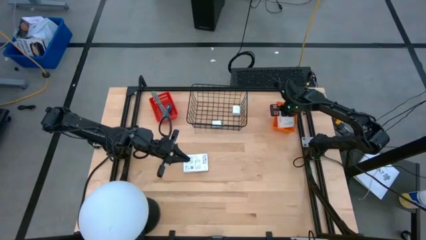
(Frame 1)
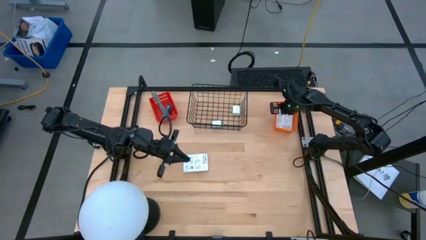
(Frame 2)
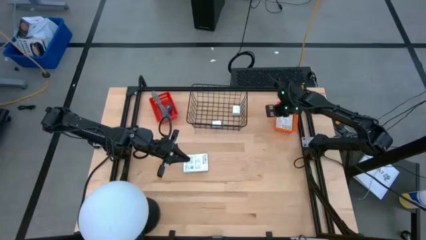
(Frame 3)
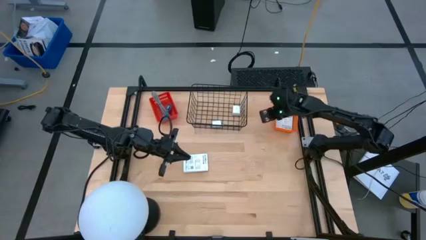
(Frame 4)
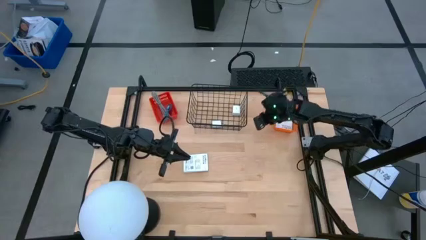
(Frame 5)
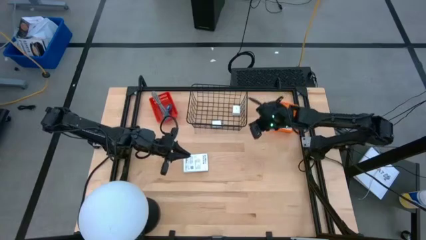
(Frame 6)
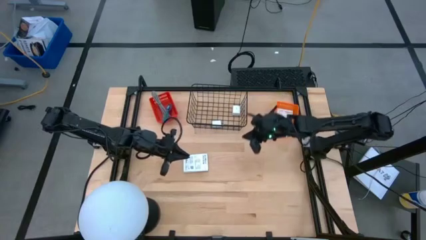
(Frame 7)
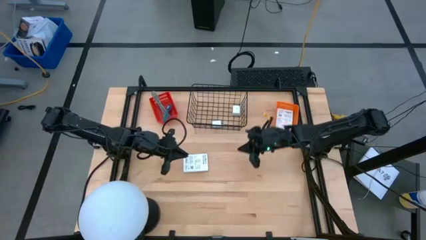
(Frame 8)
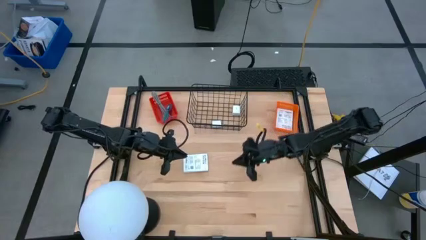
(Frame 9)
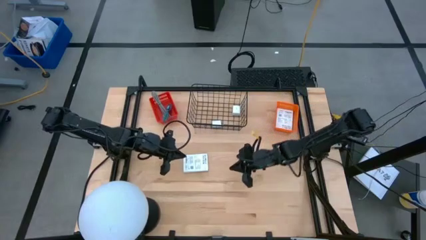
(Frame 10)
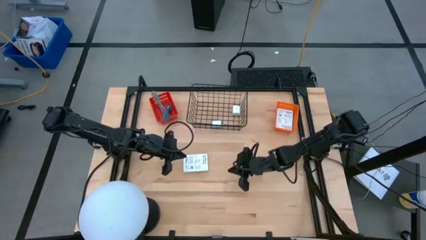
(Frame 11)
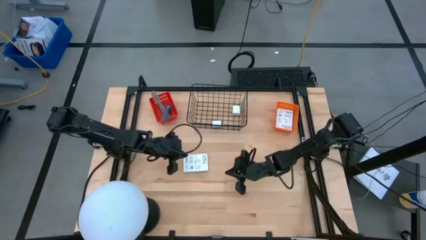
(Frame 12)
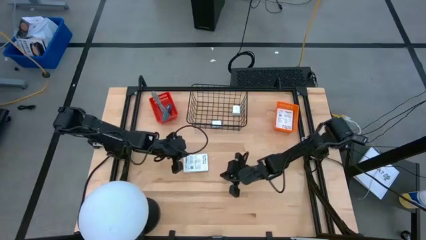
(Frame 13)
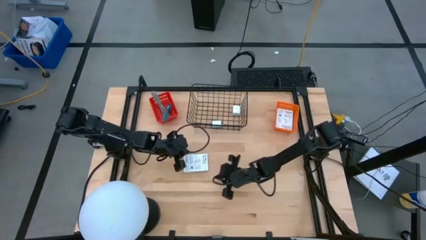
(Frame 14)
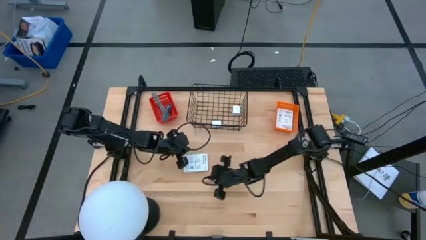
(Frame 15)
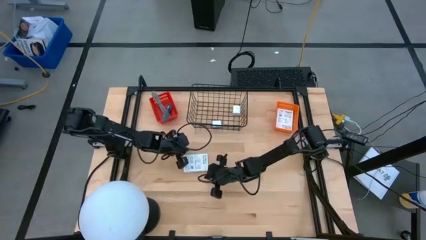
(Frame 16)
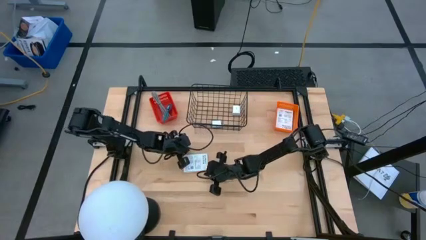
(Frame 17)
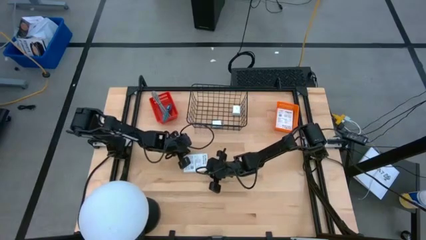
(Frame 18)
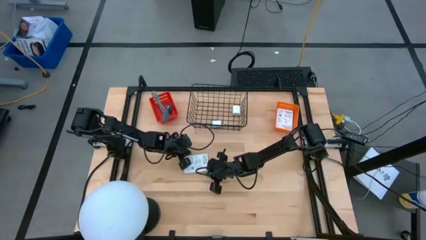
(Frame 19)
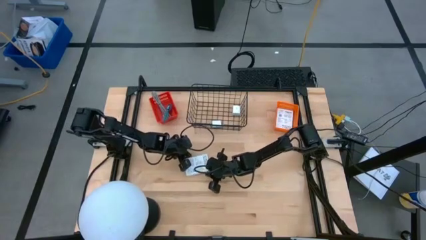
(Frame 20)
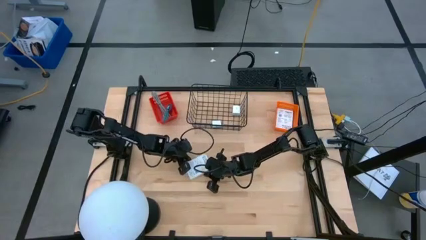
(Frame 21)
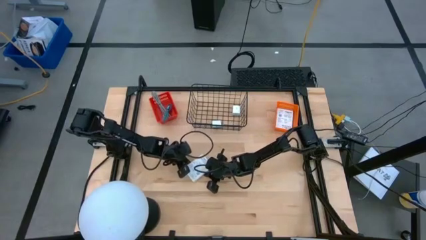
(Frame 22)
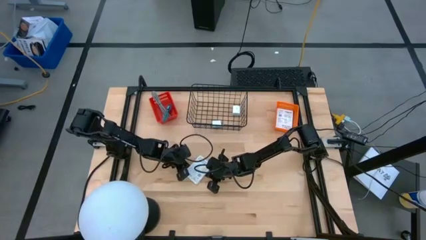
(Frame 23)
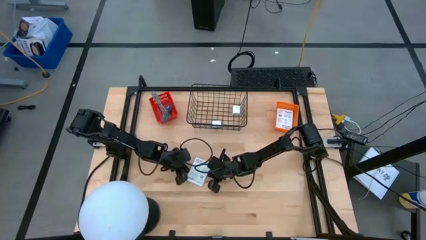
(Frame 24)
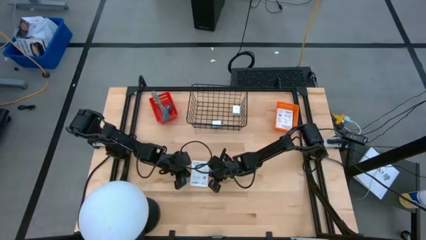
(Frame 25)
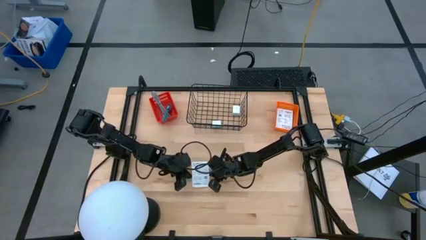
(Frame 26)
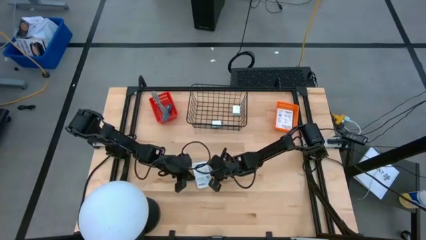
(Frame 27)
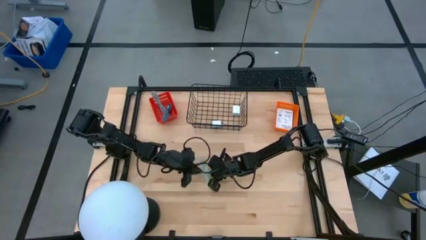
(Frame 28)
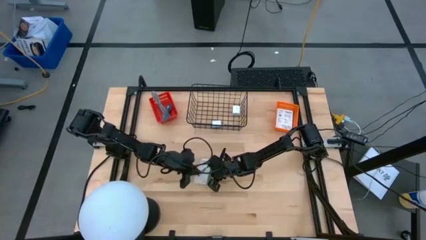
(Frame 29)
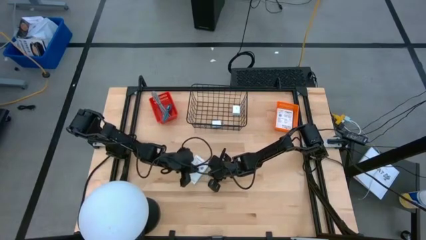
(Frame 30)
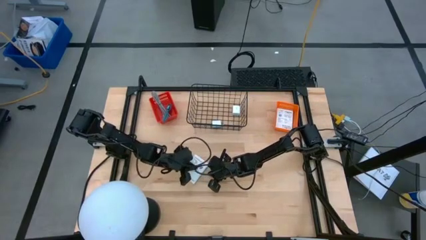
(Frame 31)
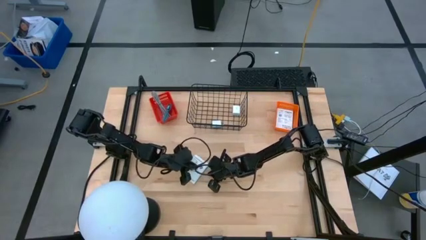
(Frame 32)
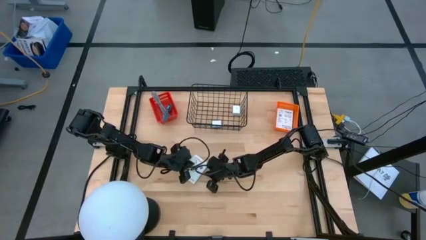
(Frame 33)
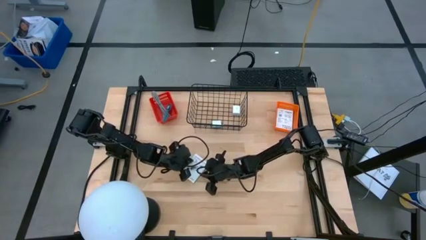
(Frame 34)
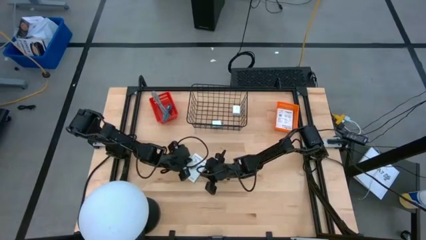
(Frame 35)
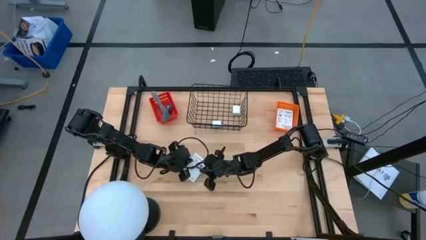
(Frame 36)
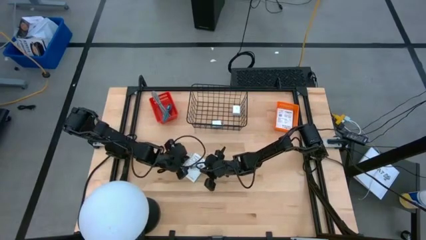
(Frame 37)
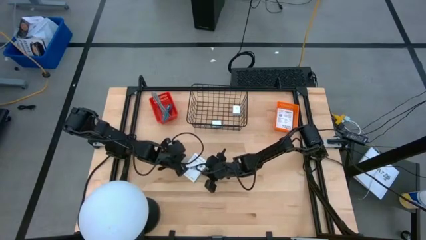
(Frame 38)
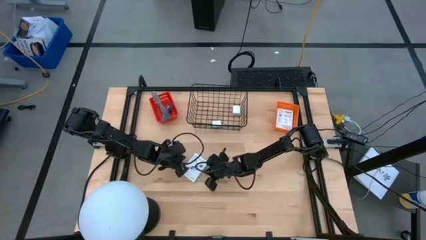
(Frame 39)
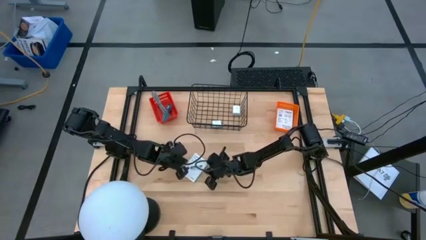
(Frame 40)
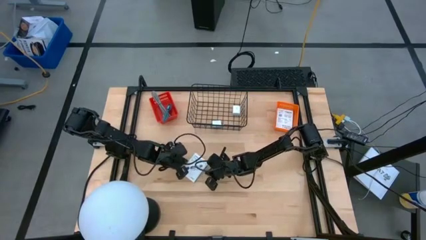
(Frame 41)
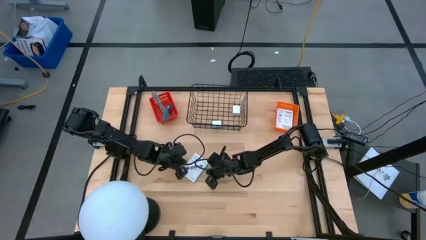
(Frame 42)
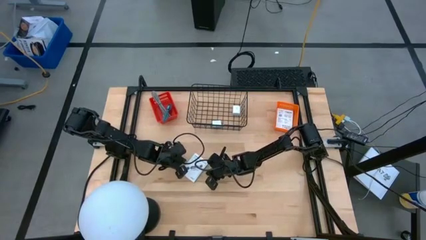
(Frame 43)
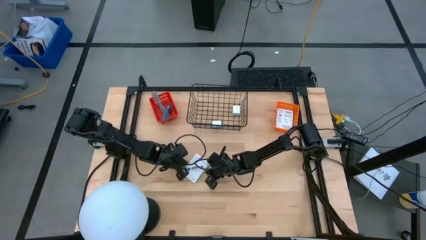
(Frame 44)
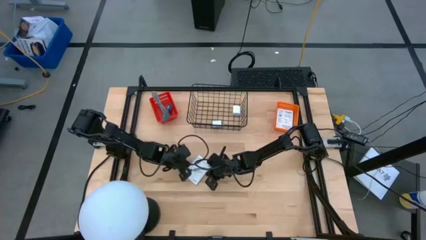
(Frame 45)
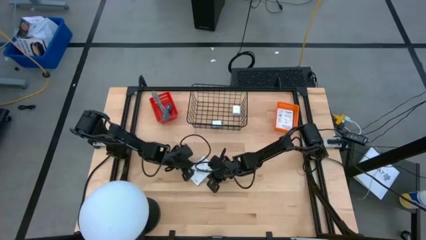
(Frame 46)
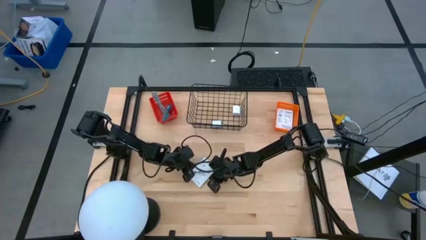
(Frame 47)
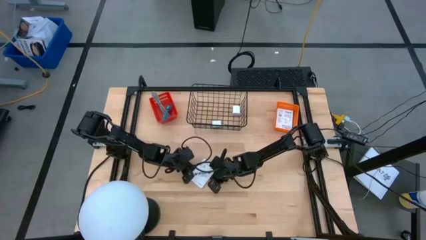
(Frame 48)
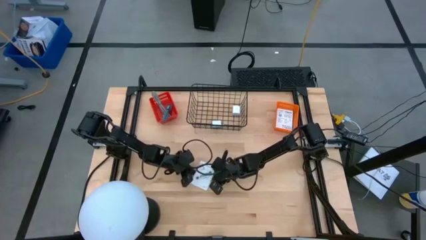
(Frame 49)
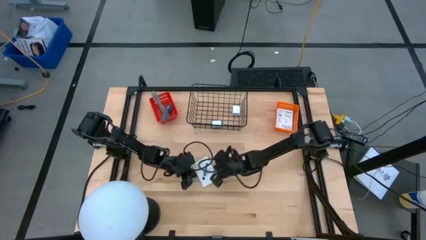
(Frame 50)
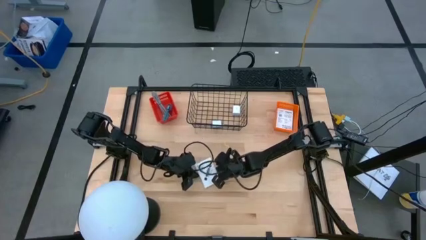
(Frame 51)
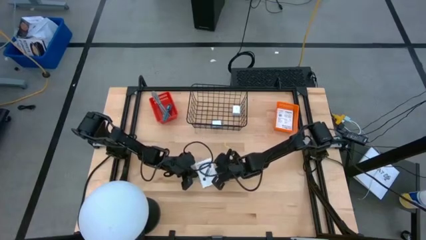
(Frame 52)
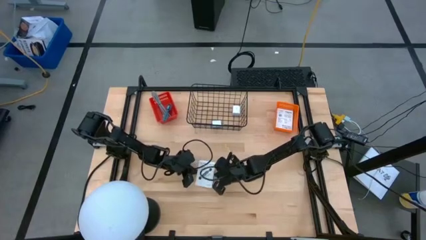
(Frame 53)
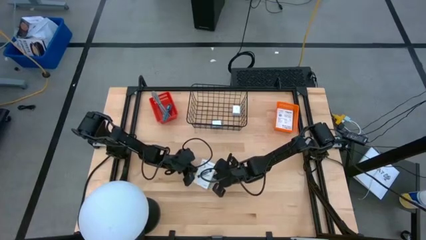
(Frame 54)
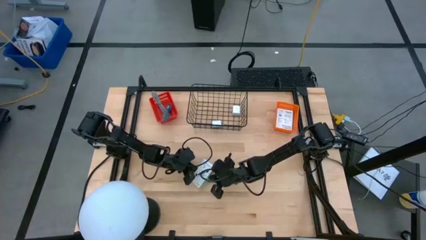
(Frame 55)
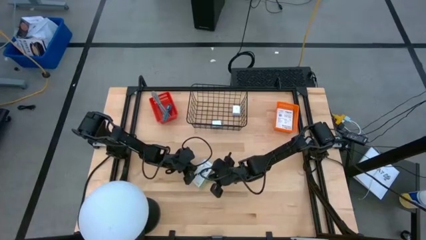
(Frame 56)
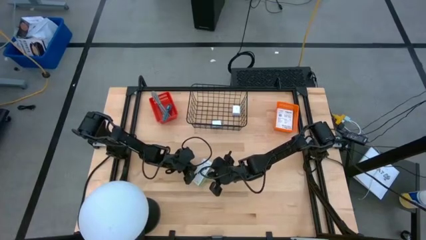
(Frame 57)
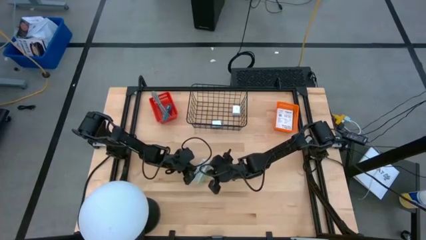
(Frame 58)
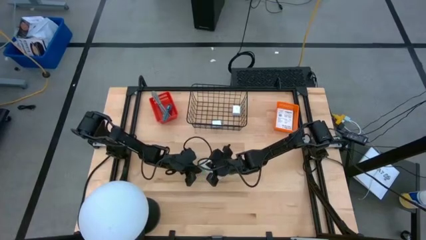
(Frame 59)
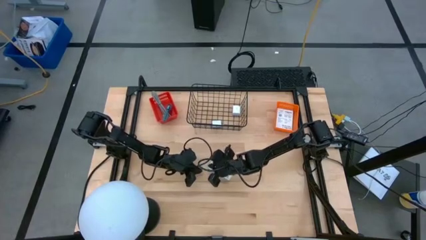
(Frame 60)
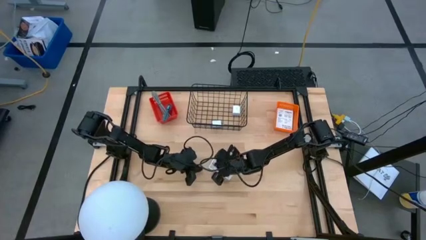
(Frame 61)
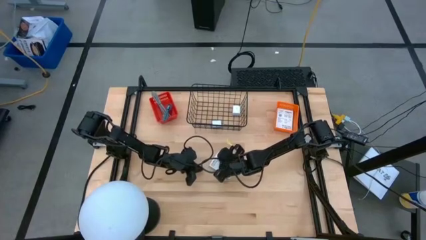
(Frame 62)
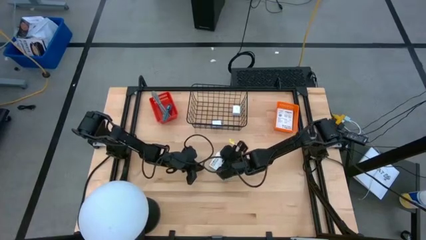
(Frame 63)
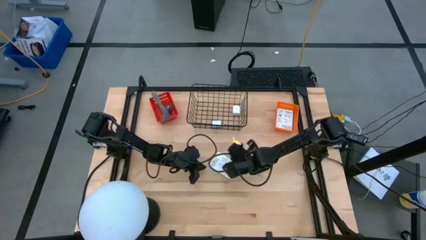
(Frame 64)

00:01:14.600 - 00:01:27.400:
Task: Pick and place items into bin
Put the card reader box into the orange bin
